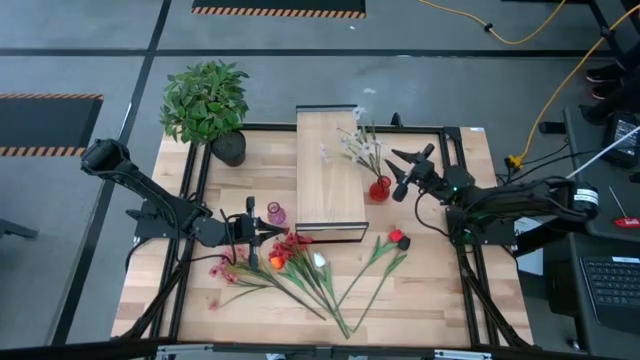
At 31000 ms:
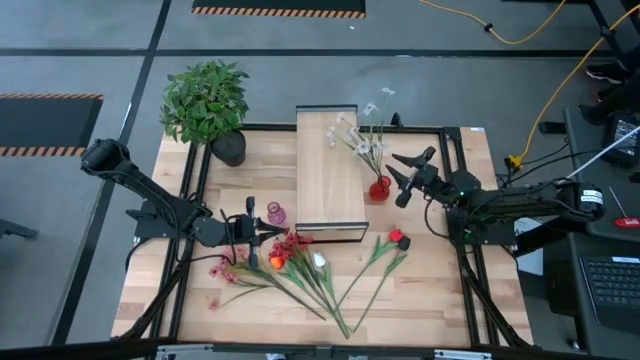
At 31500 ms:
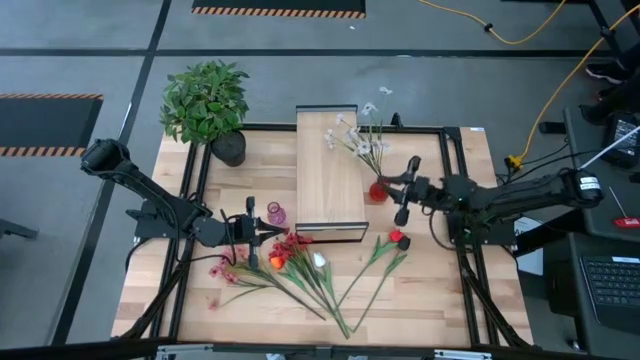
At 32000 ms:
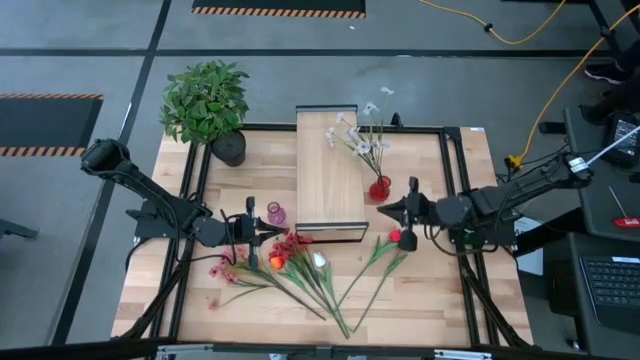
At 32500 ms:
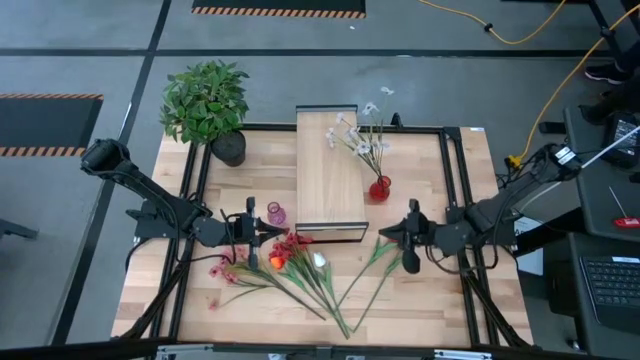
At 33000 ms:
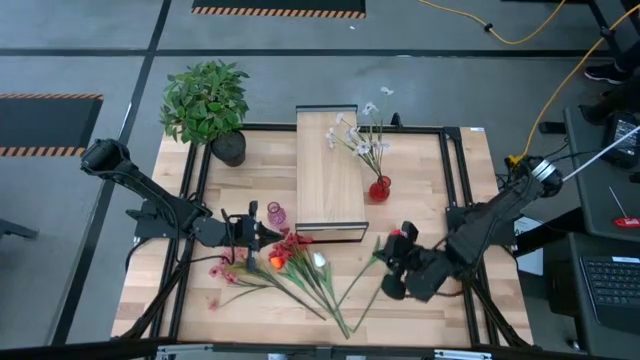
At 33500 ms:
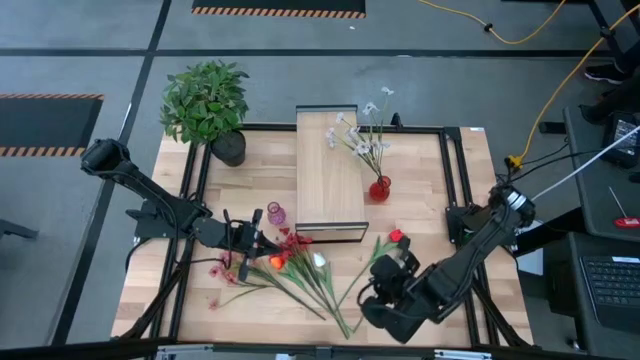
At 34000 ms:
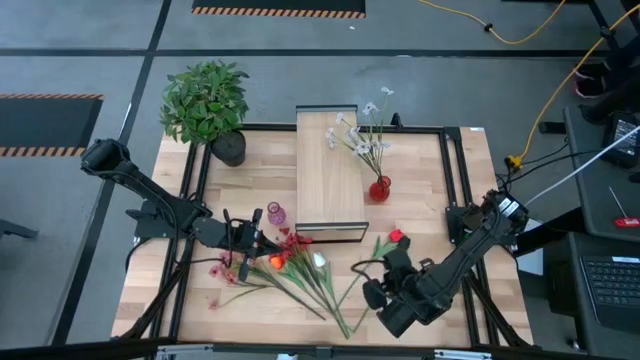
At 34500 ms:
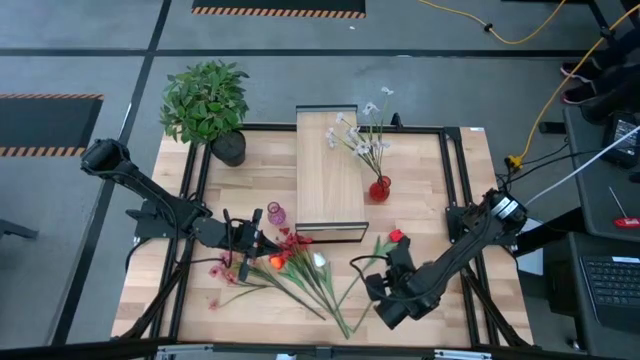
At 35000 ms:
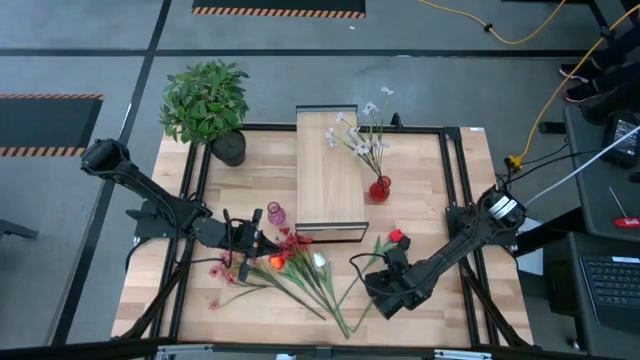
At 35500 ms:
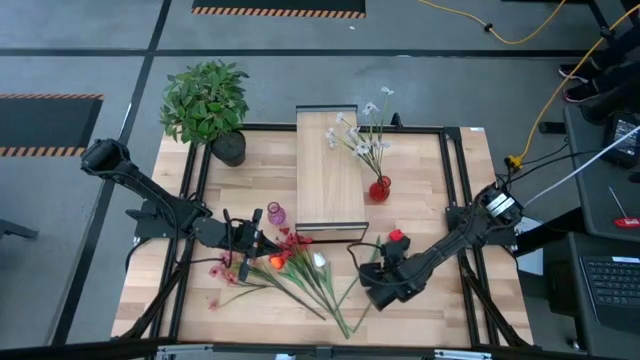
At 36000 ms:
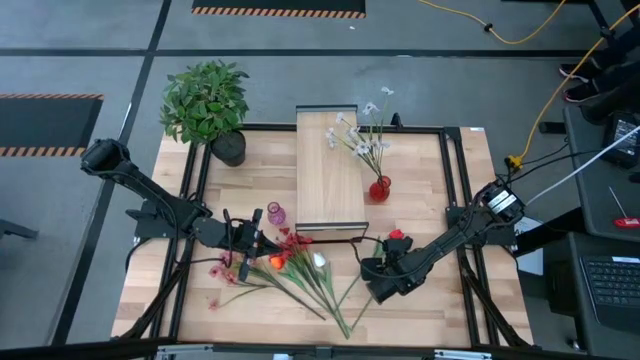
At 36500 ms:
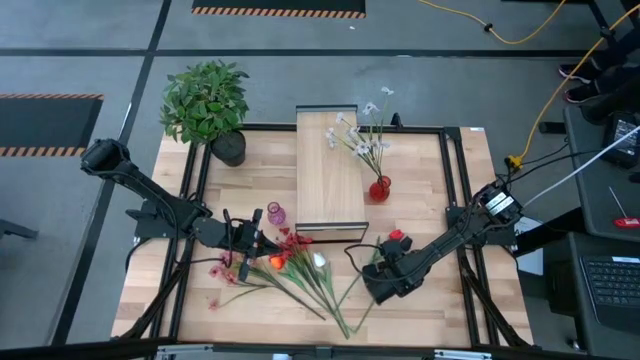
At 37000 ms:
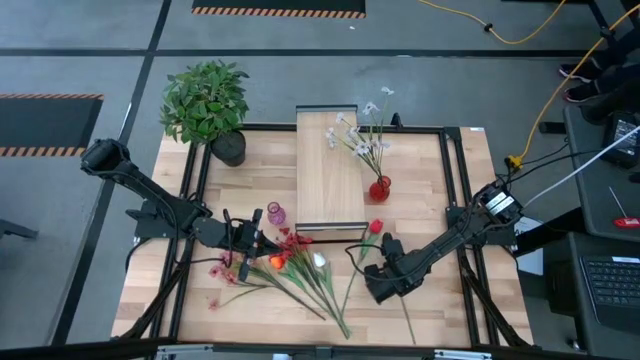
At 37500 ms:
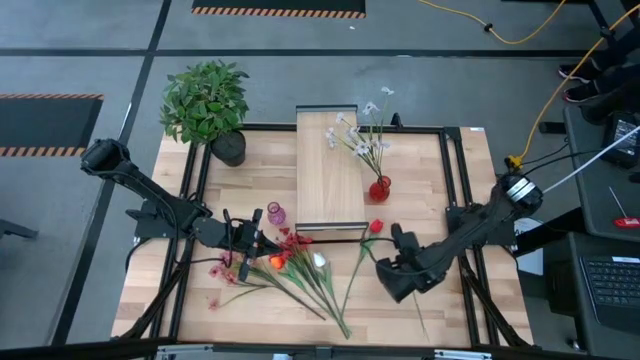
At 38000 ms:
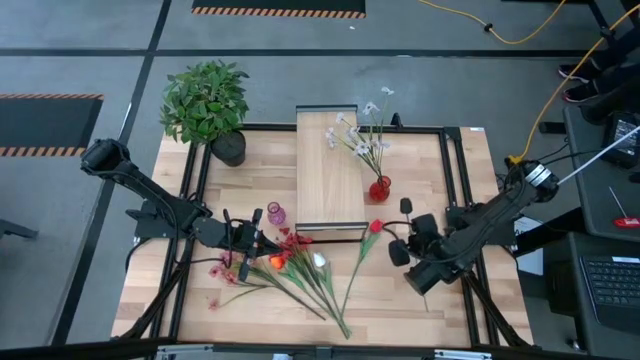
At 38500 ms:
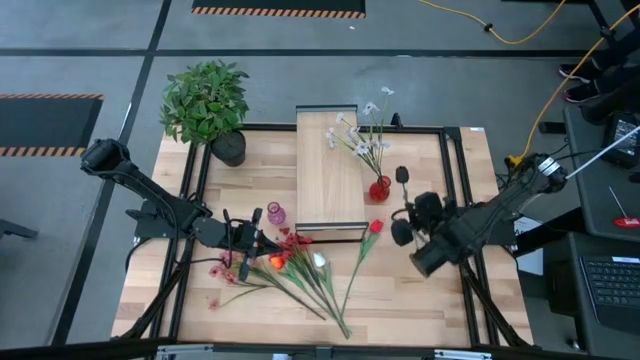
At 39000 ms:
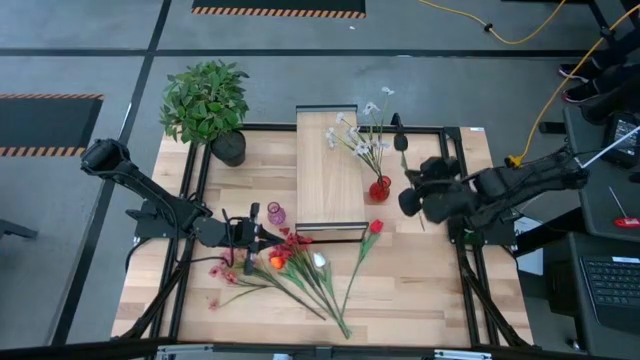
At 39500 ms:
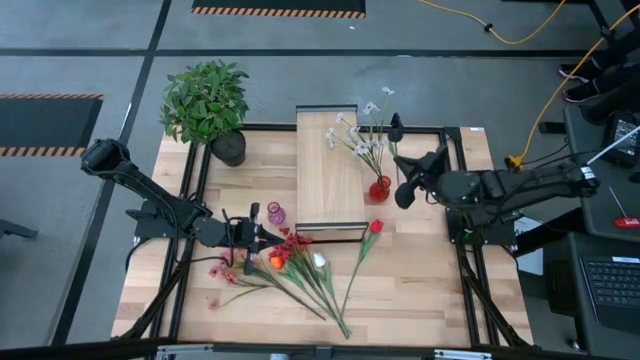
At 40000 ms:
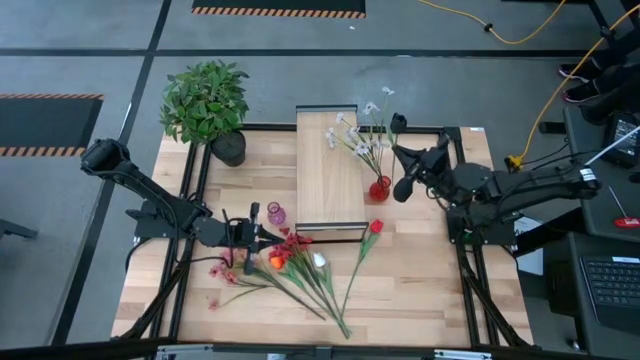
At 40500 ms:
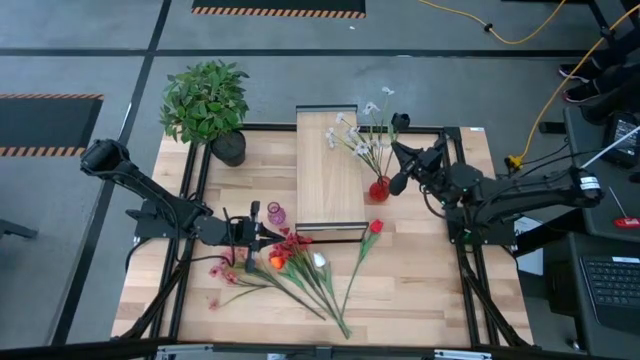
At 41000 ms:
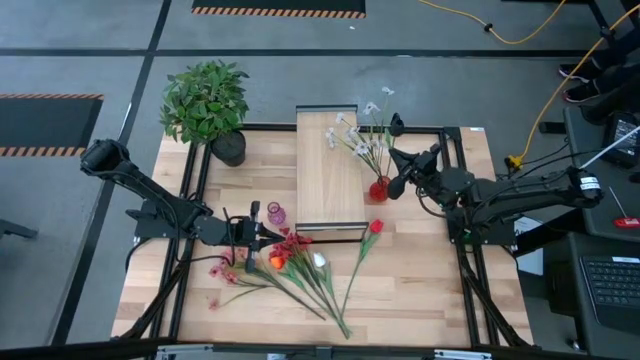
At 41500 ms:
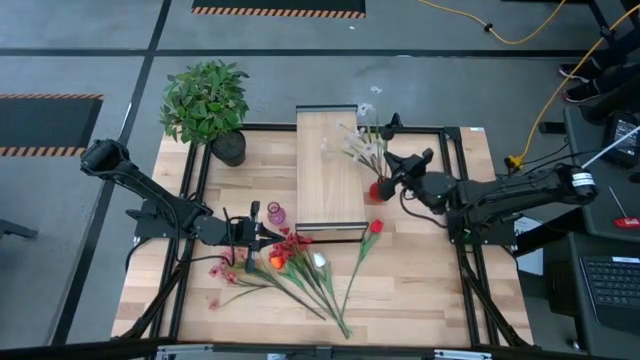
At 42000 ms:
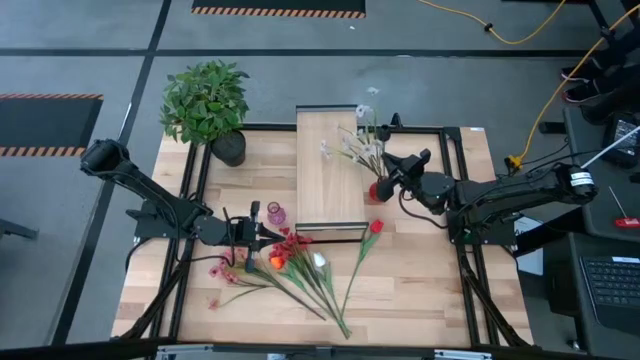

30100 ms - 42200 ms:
Task: Pick and place flowers into a vace then onto a shelf
Put the black tulip into the red vase
